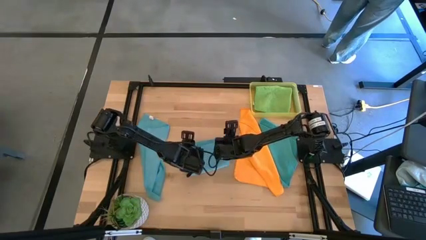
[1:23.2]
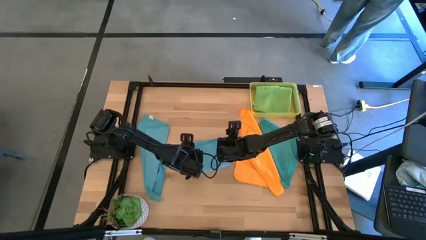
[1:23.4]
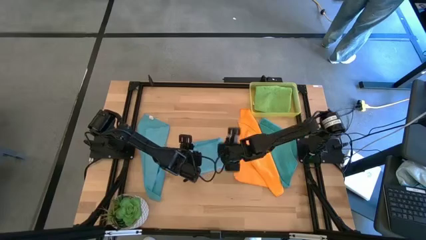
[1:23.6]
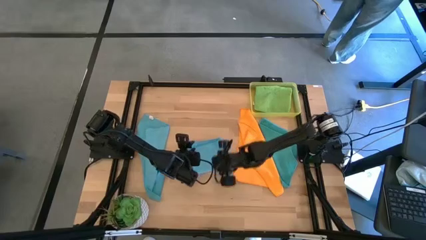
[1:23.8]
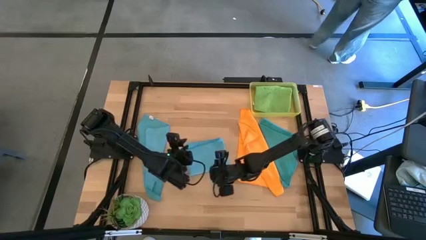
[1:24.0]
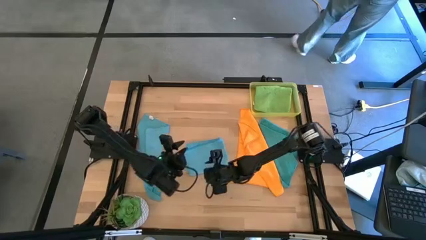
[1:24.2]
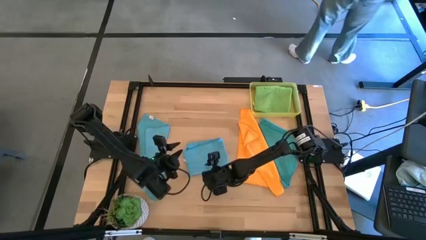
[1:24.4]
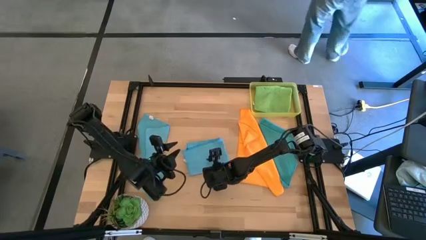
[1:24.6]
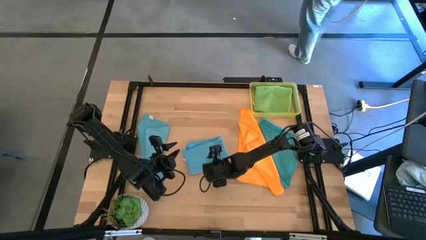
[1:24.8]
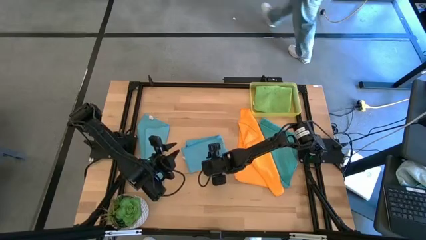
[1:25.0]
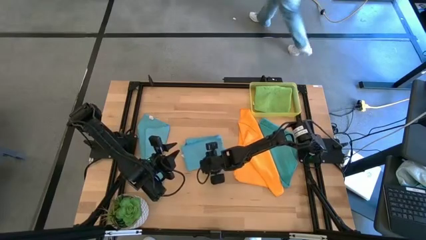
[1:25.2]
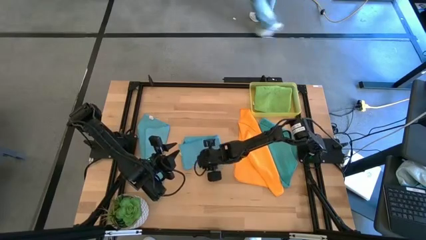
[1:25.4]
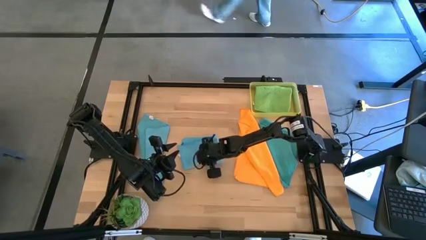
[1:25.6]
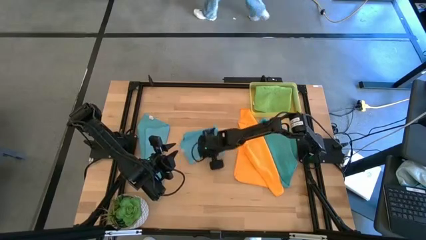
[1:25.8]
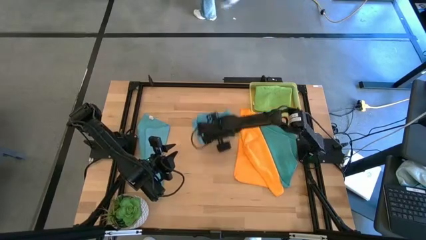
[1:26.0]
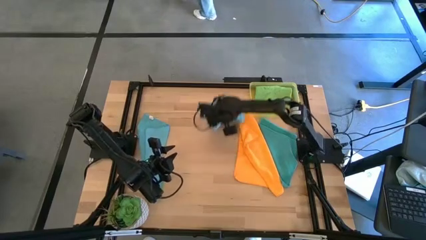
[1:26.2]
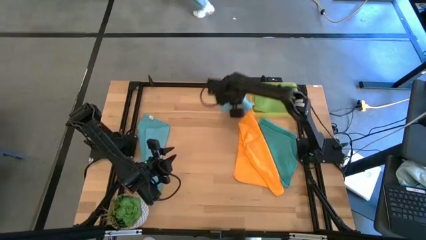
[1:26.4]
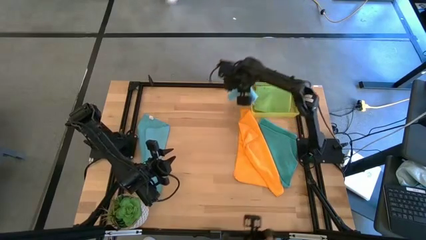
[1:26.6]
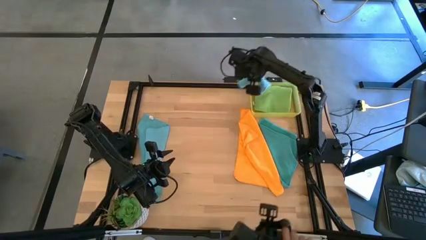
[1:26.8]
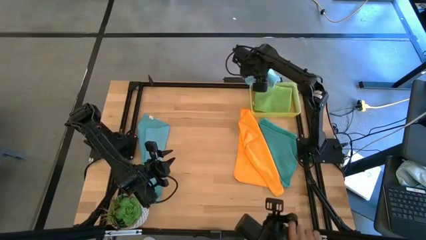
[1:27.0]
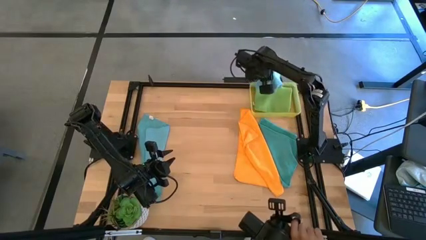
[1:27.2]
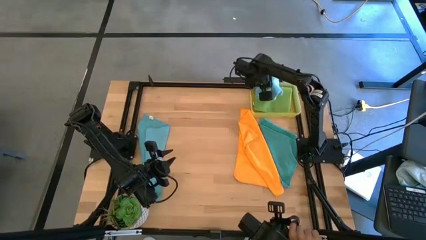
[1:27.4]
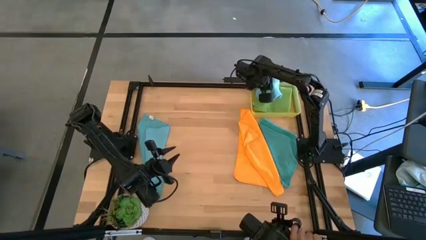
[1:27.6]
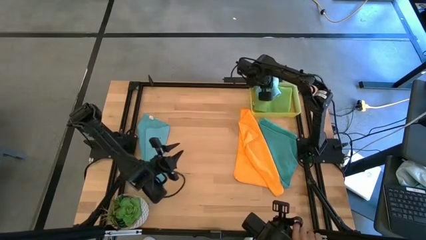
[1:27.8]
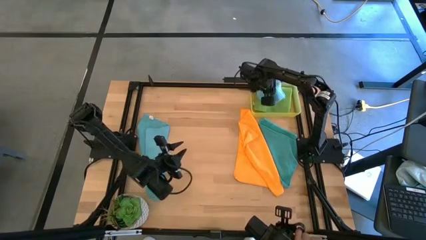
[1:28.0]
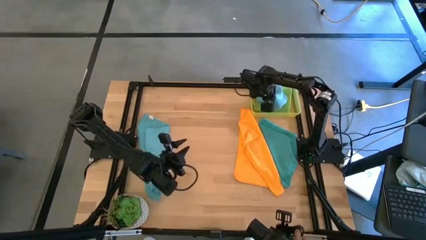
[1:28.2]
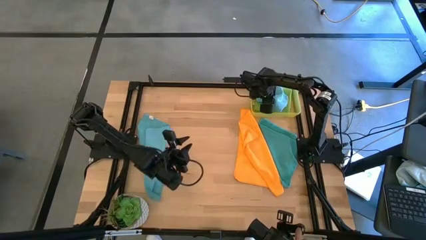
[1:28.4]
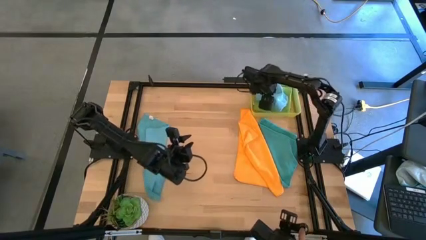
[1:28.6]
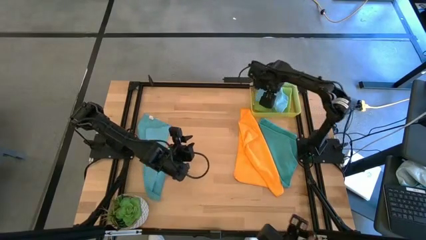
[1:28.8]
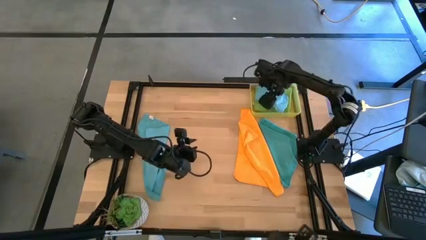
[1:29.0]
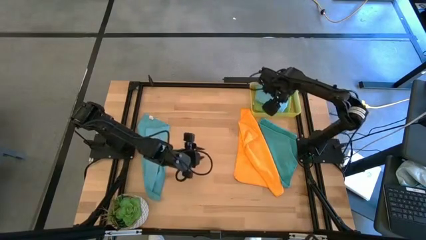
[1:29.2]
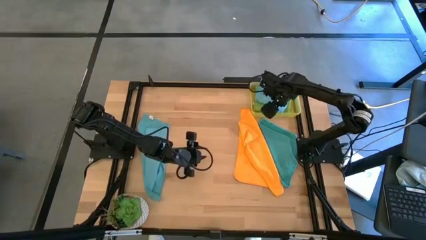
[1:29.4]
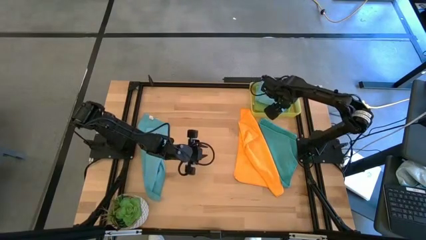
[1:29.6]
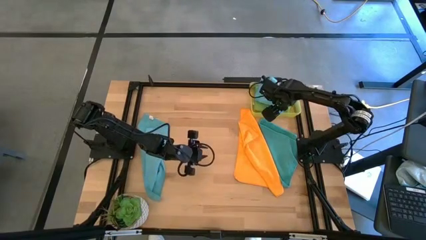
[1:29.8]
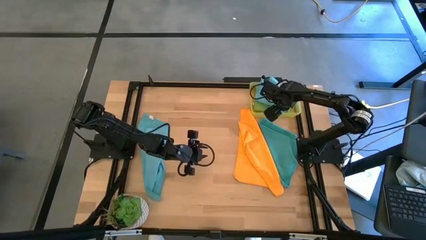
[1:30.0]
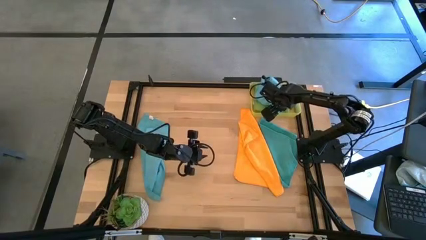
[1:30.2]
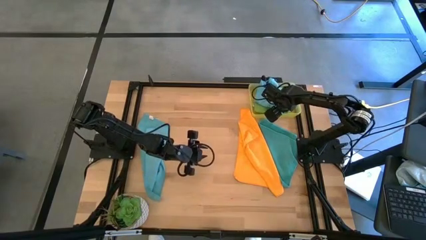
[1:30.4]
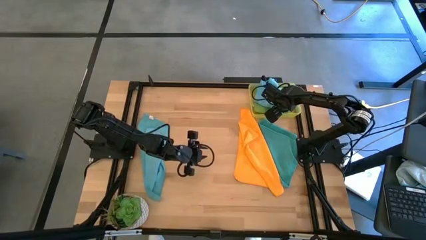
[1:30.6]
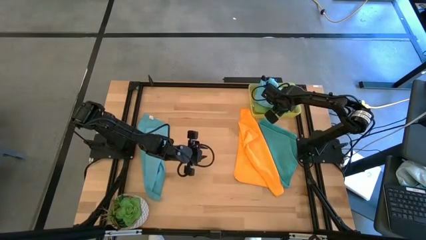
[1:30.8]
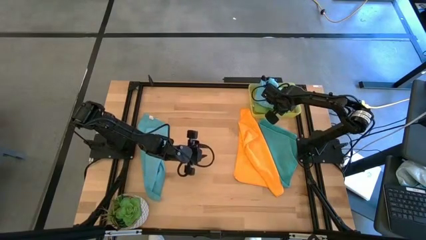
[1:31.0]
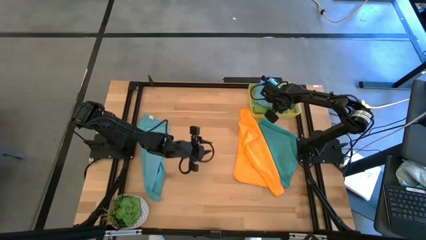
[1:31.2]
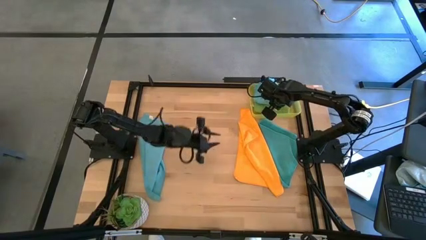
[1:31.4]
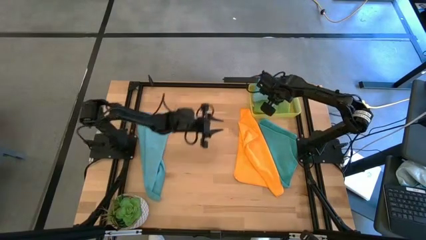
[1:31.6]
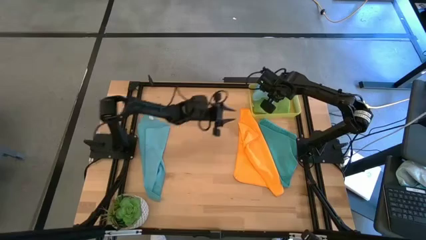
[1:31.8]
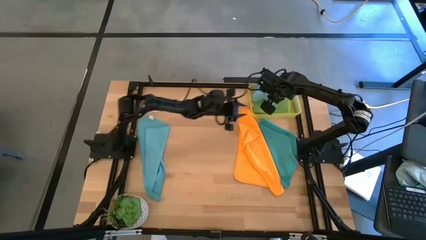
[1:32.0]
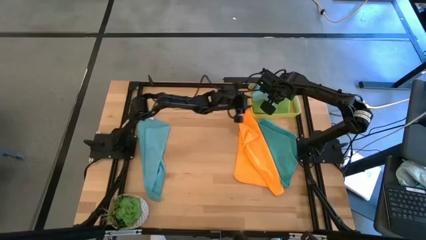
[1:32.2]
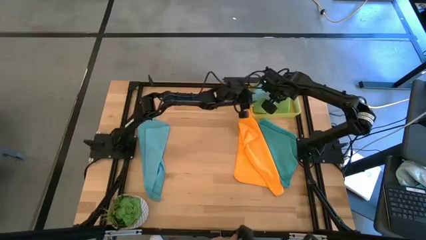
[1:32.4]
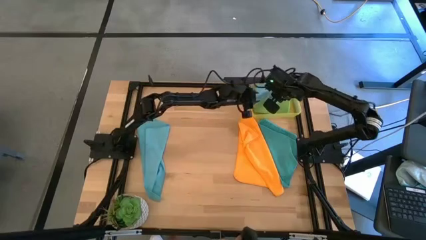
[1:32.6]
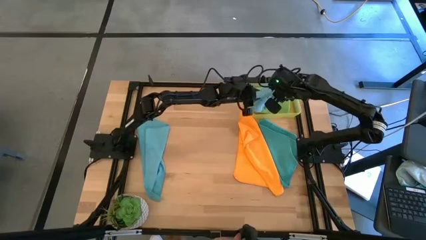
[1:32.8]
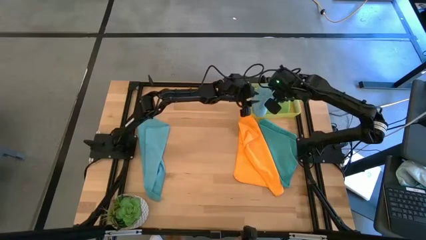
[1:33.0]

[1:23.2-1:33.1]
Task: Fold microfiber towels
Put the folded blue microfiber cloth into the yellow bin

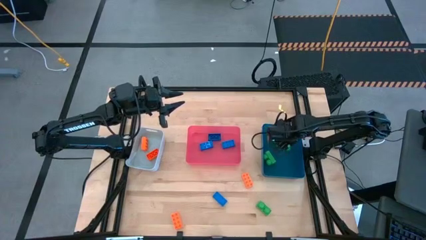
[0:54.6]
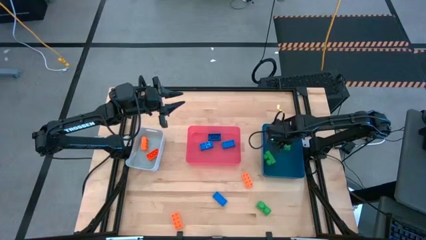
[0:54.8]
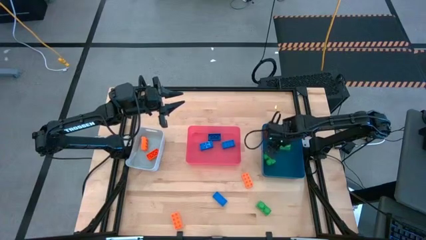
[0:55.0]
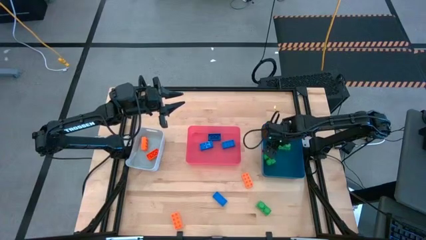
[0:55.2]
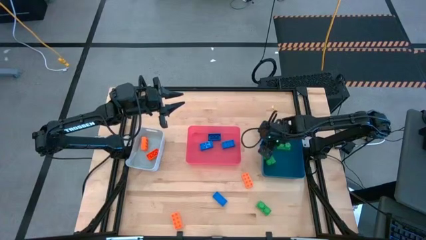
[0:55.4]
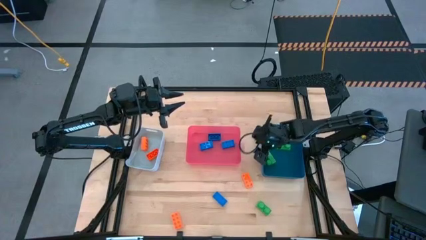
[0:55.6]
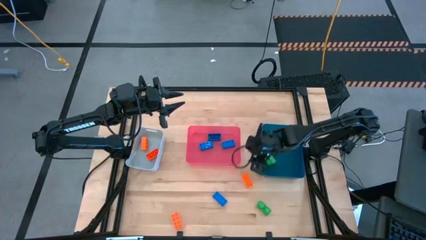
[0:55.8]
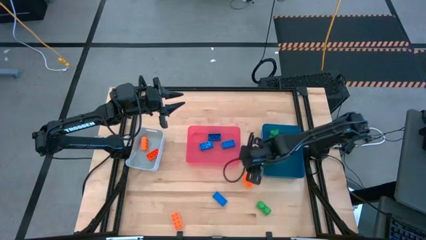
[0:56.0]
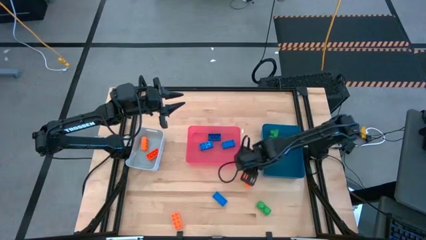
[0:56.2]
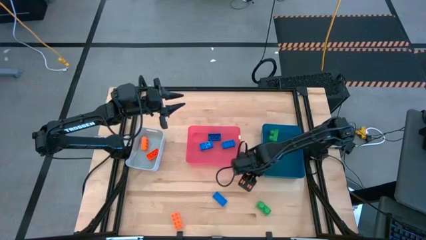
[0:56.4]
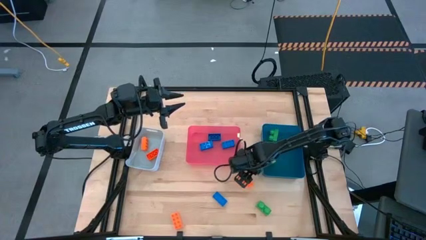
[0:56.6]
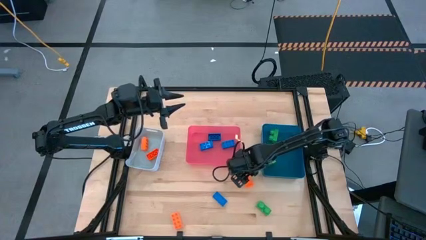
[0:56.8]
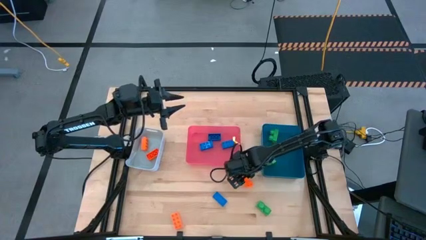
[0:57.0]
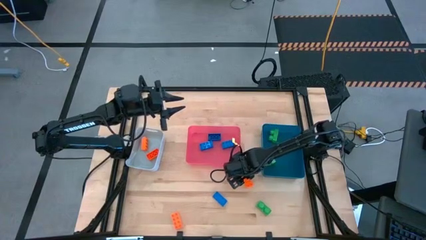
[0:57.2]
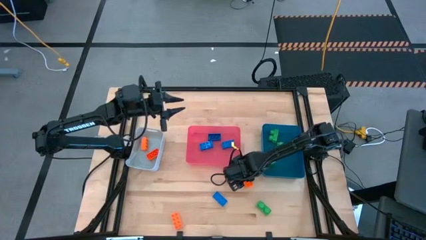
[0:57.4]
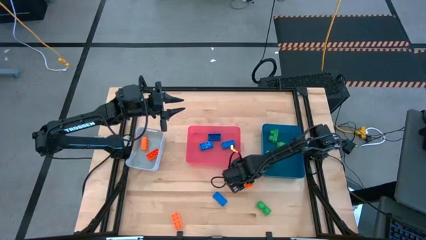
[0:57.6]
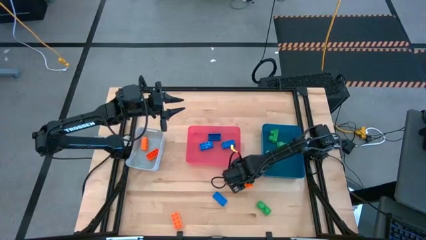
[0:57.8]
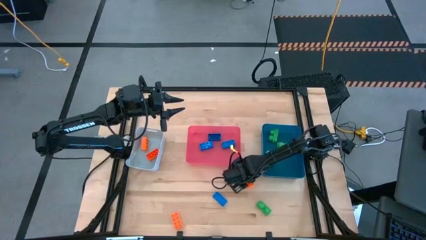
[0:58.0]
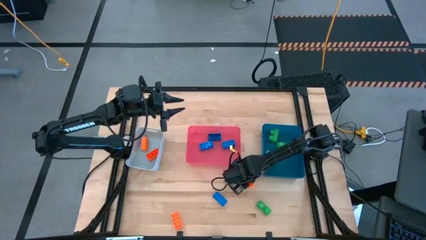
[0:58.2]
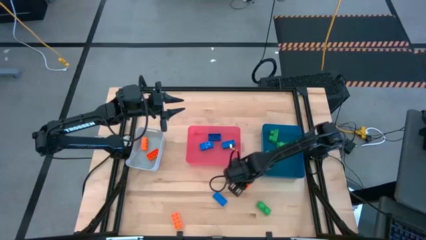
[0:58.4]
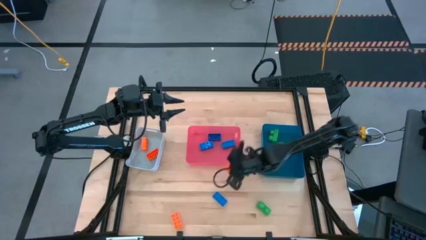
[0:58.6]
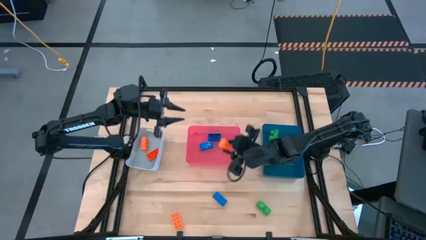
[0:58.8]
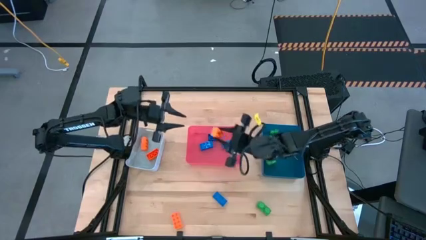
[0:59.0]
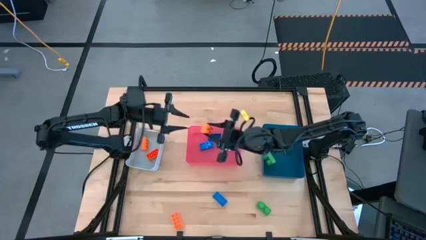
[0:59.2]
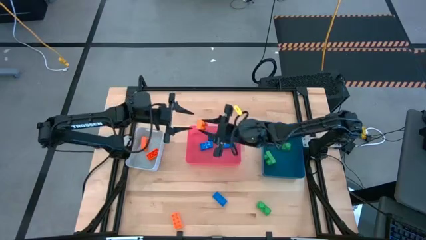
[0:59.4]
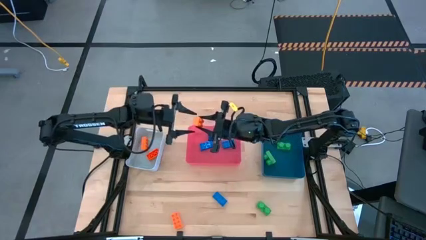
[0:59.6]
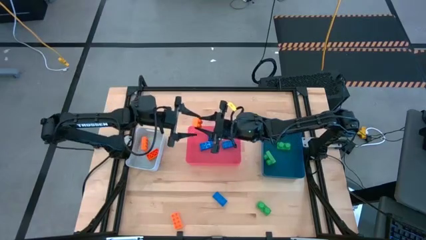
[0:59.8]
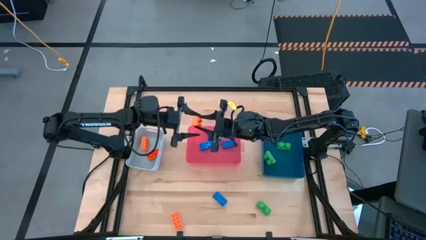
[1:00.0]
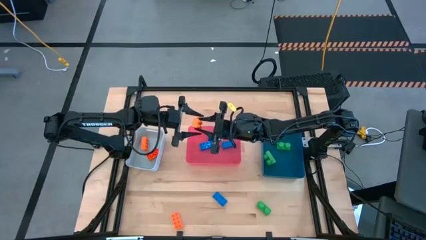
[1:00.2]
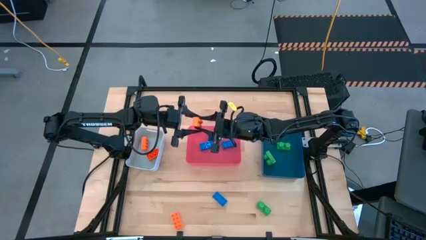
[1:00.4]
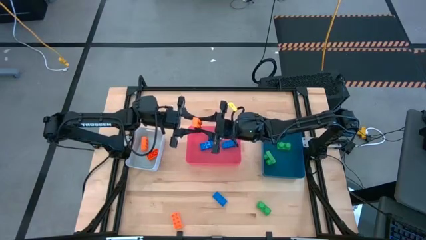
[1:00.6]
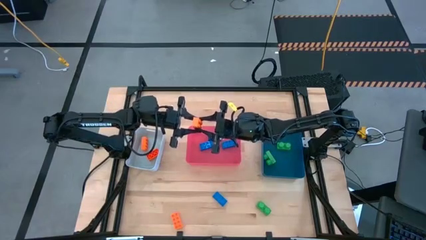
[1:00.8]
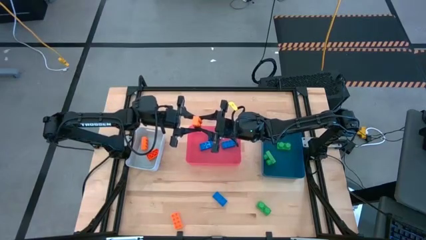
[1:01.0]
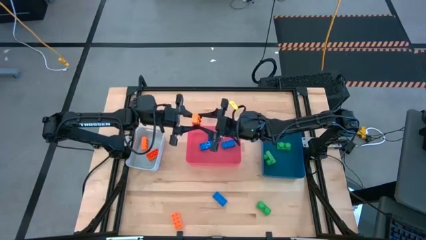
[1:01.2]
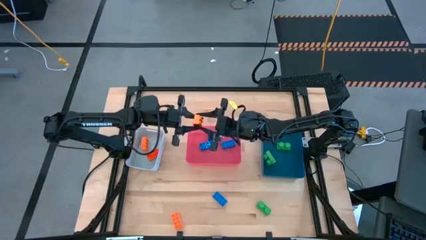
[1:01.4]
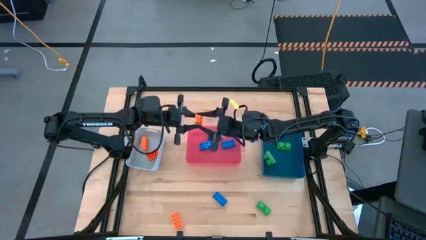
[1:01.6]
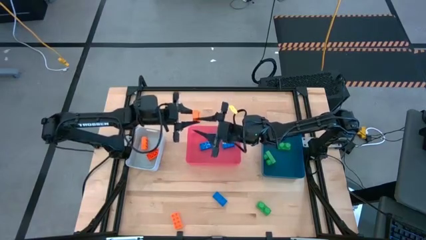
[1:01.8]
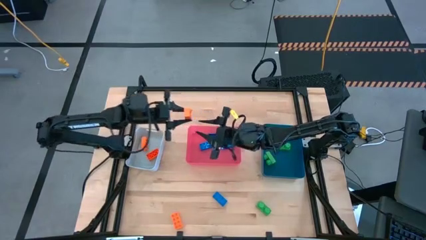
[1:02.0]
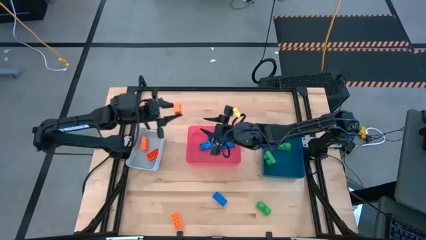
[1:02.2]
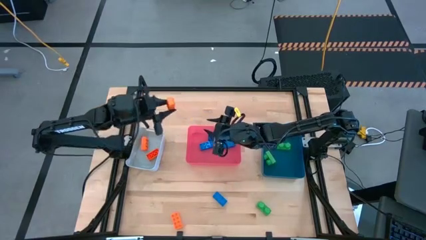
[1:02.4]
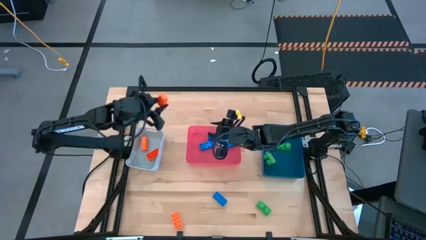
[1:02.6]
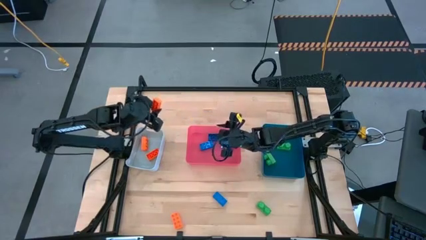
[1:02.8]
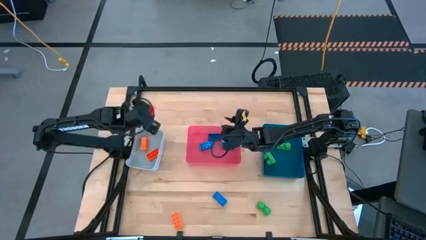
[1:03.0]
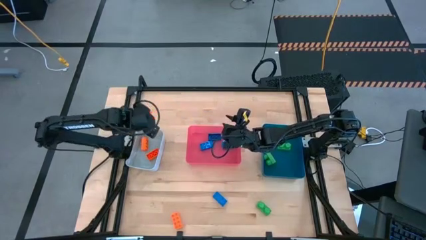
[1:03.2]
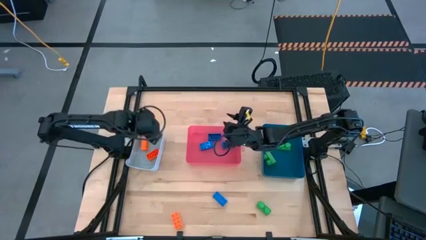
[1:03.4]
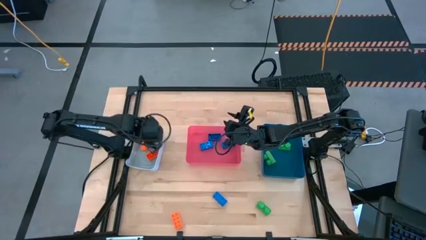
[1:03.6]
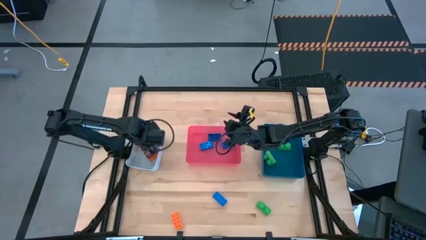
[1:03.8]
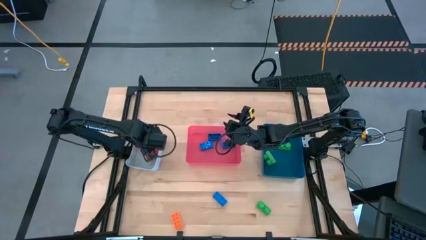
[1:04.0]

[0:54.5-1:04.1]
Task: Sort & place blocks by color
Put the orange game piece into the gray bin
